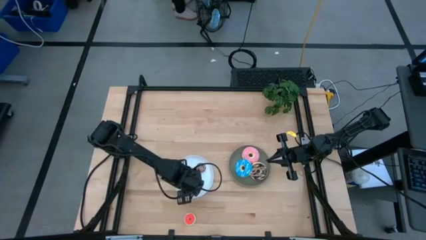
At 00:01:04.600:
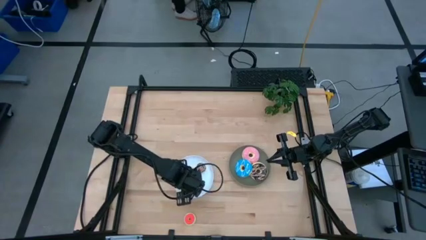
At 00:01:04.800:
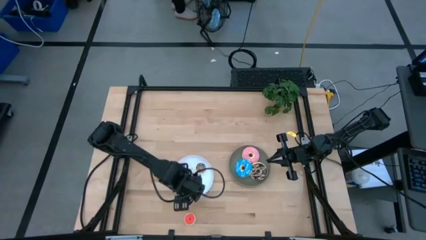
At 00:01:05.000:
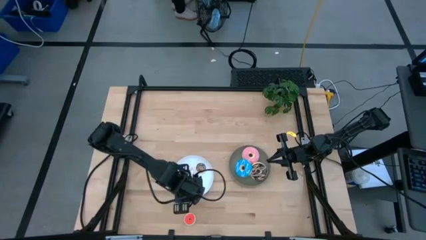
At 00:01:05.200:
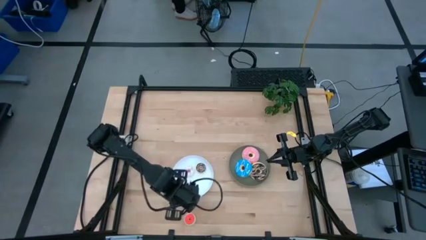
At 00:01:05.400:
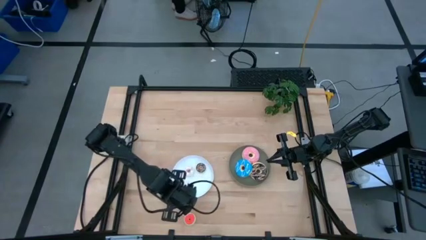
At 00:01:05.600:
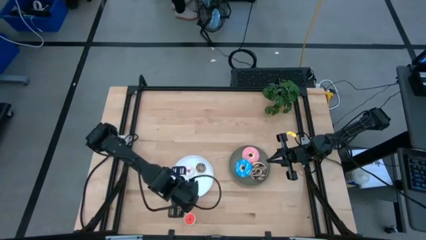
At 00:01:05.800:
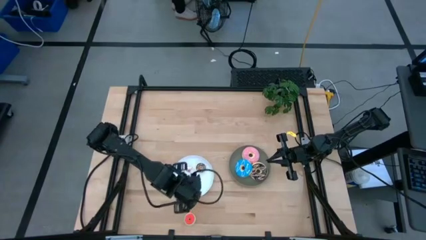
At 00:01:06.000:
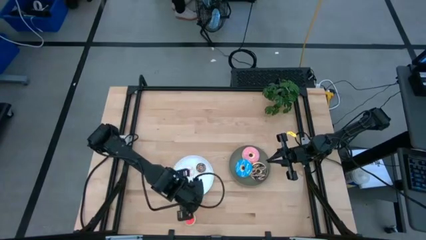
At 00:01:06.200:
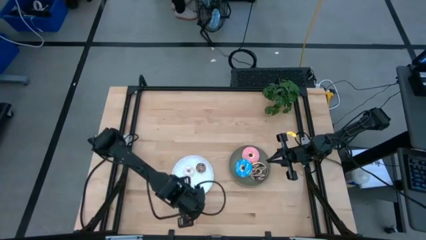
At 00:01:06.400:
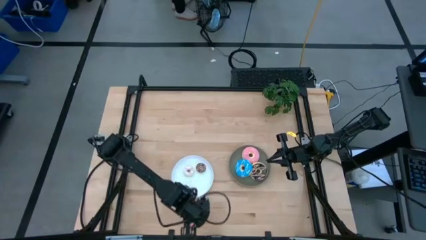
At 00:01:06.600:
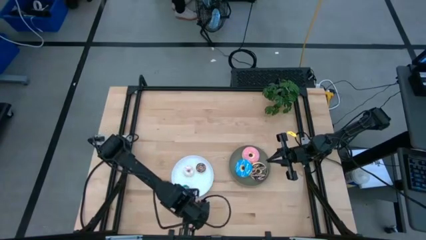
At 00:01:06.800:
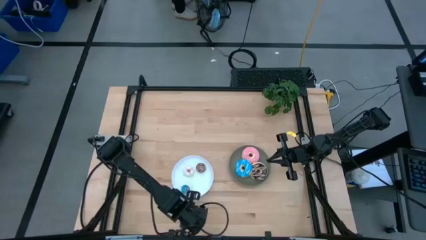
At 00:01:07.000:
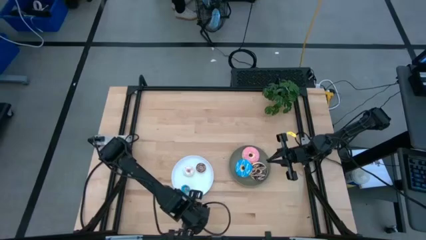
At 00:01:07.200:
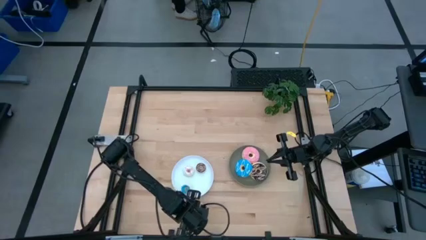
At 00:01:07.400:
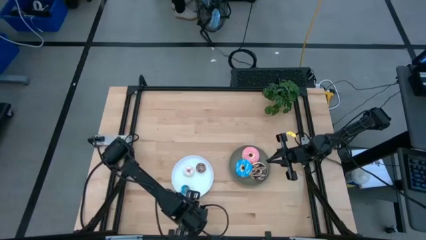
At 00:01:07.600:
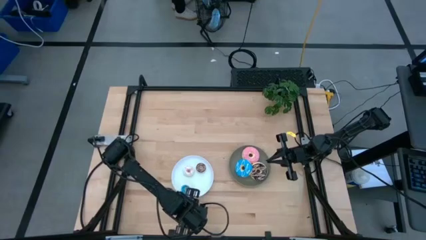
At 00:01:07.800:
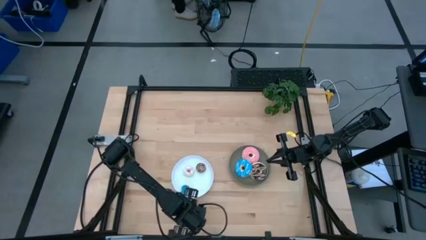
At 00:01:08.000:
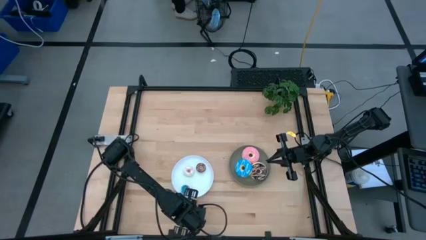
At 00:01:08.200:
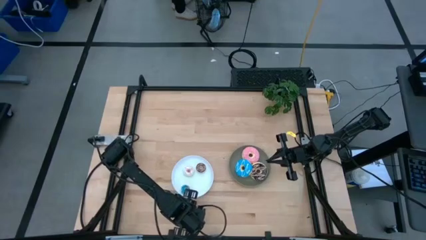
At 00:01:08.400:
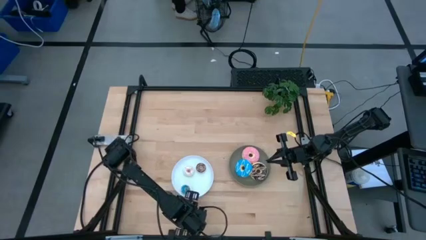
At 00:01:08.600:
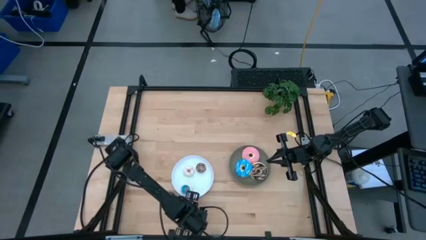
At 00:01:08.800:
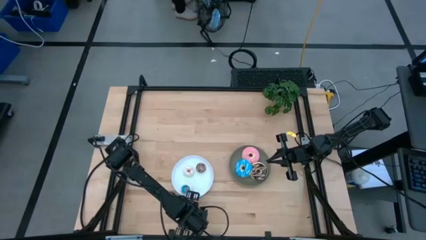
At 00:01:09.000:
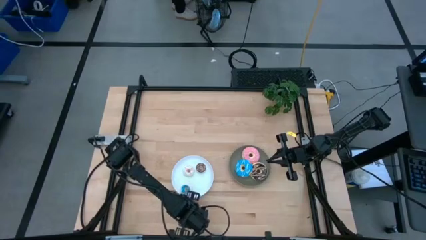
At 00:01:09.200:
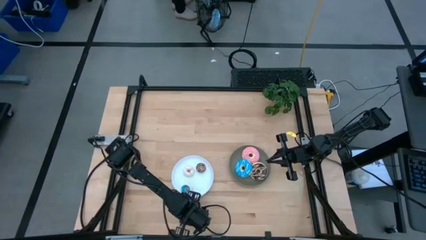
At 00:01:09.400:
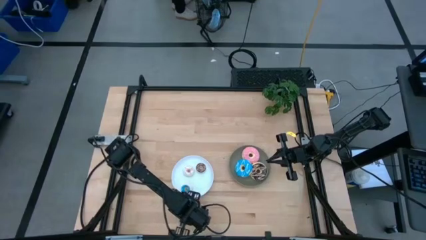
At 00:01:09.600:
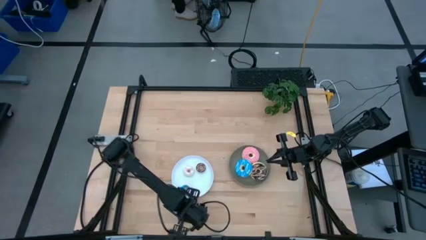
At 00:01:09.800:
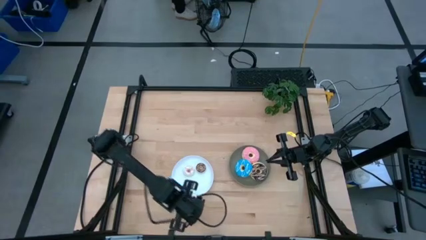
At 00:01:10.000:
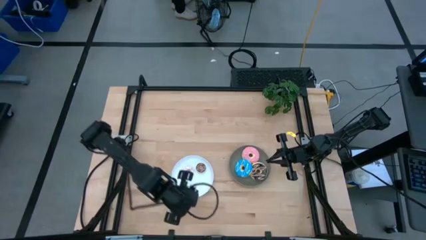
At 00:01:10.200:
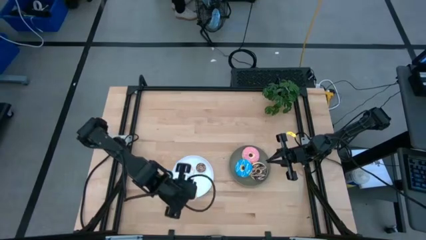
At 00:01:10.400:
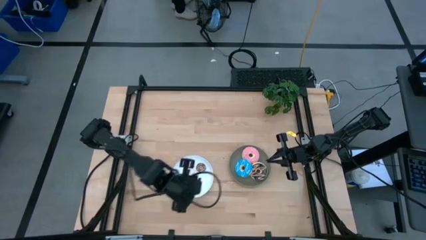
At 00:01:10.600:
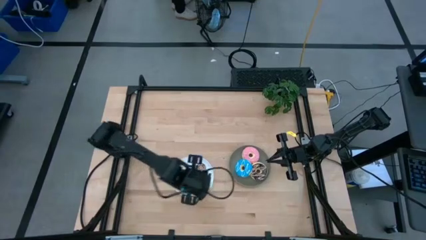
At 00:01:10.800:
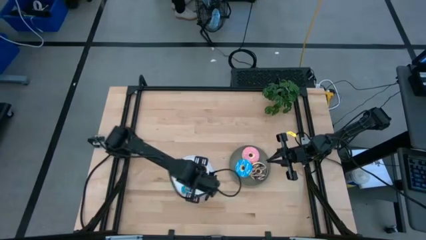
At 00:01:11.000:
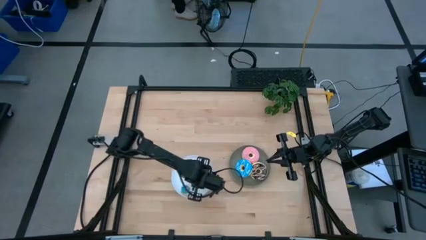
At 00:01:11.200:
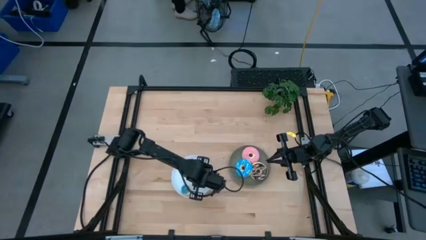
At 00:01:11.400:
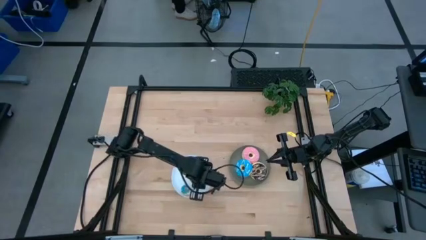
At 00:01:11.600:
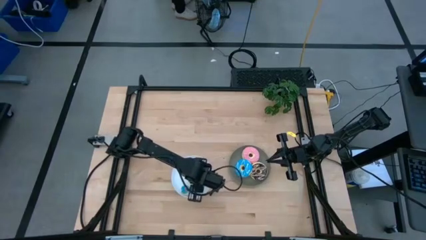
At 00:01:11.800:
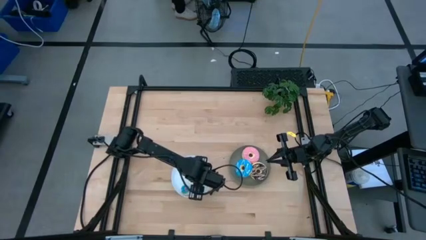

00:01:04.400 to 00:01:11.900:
Task: Pick & Place donuts
Put the small red donut on the white plate

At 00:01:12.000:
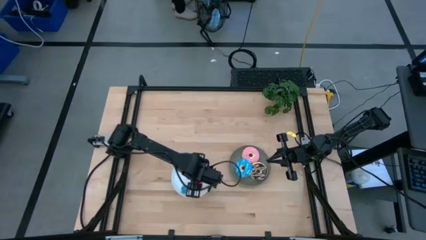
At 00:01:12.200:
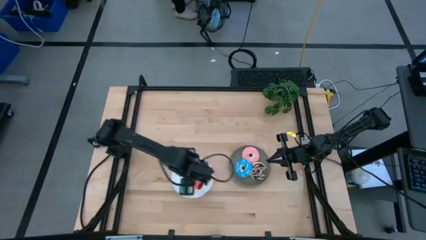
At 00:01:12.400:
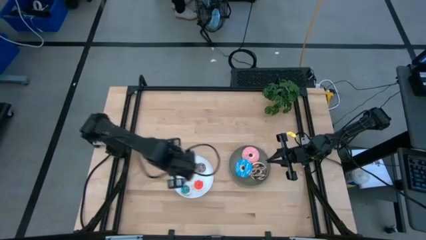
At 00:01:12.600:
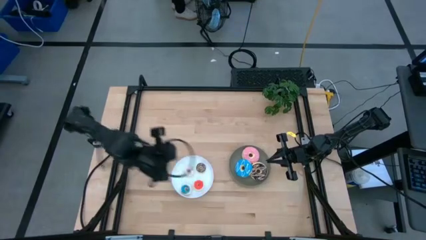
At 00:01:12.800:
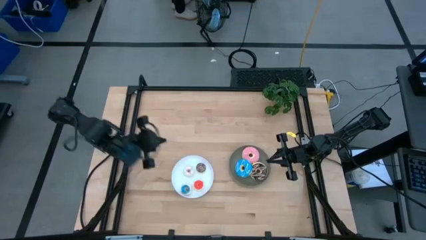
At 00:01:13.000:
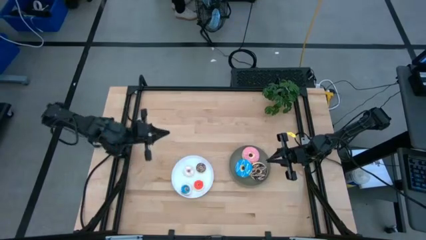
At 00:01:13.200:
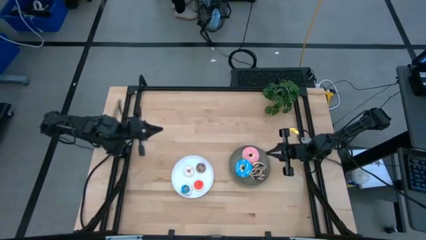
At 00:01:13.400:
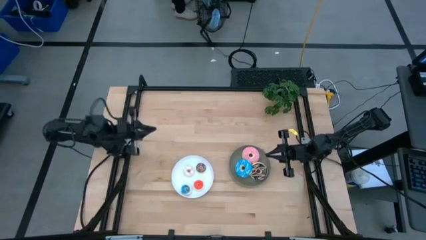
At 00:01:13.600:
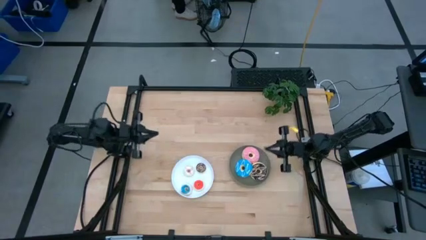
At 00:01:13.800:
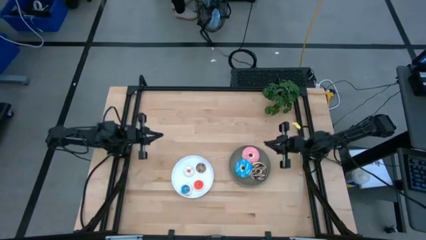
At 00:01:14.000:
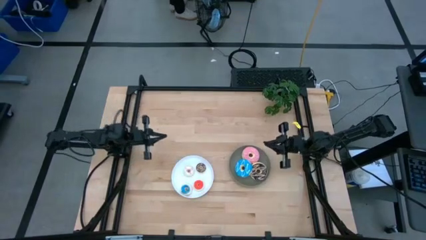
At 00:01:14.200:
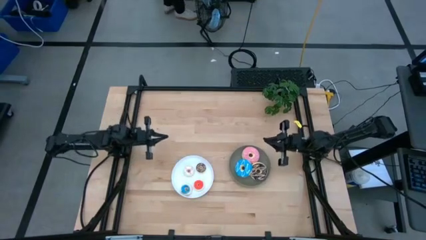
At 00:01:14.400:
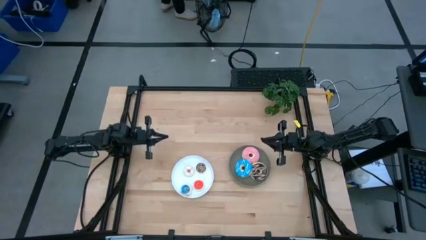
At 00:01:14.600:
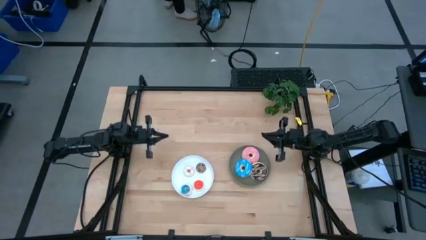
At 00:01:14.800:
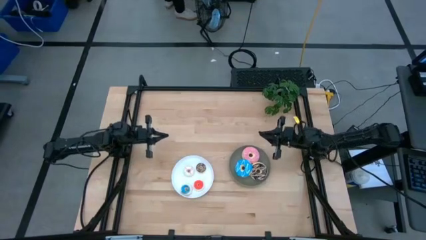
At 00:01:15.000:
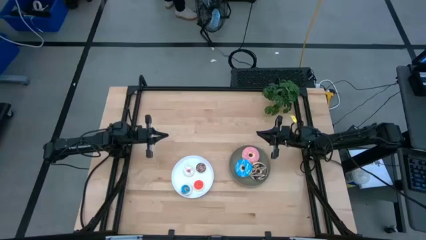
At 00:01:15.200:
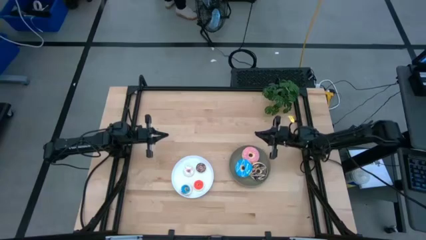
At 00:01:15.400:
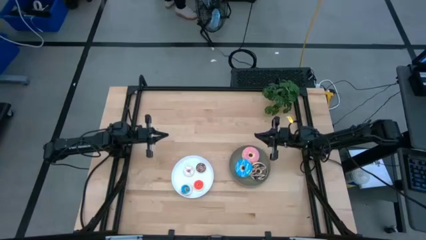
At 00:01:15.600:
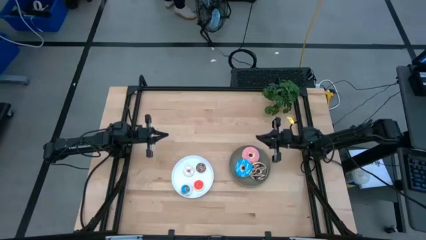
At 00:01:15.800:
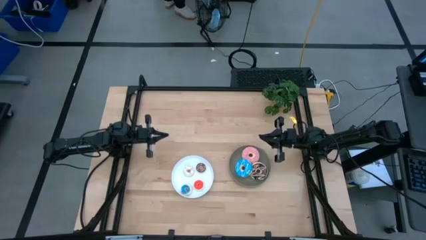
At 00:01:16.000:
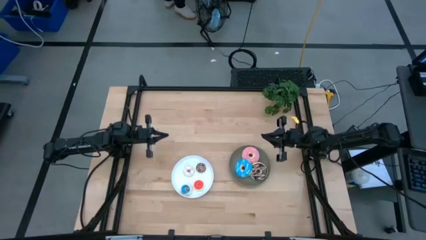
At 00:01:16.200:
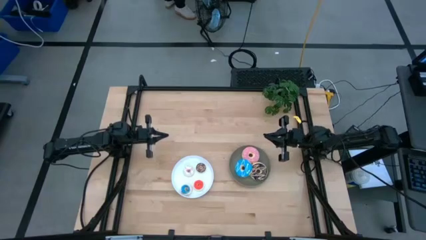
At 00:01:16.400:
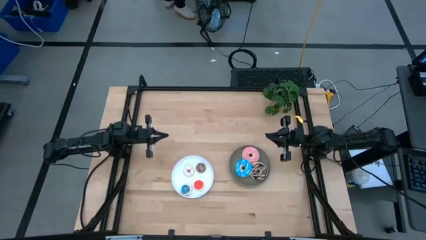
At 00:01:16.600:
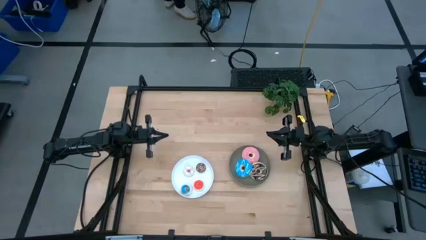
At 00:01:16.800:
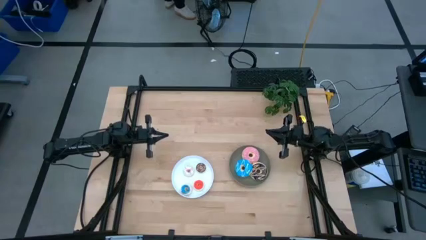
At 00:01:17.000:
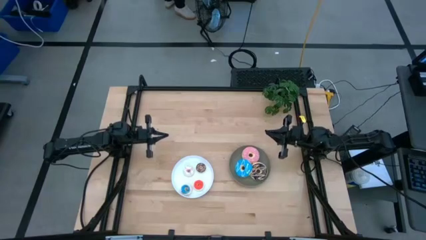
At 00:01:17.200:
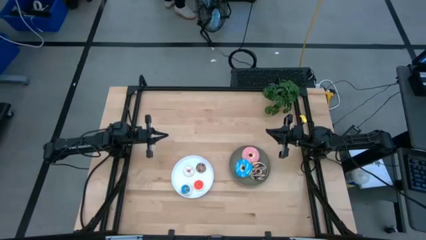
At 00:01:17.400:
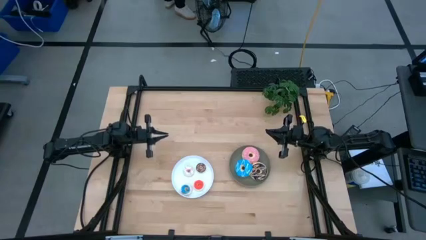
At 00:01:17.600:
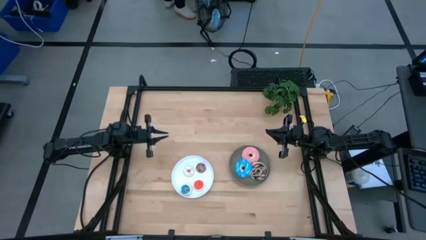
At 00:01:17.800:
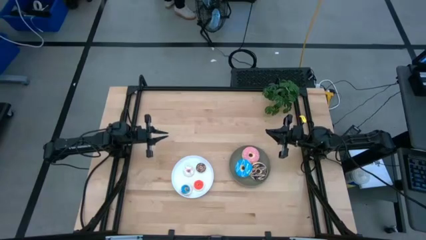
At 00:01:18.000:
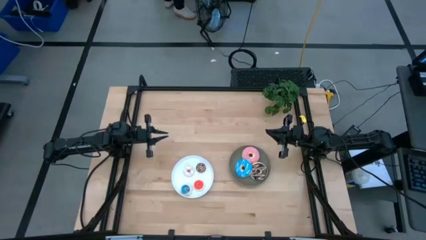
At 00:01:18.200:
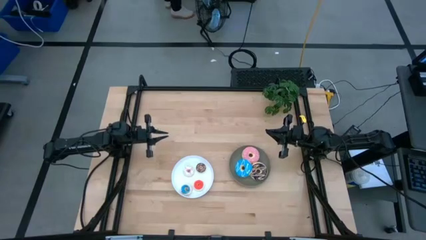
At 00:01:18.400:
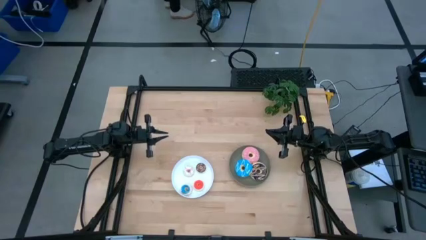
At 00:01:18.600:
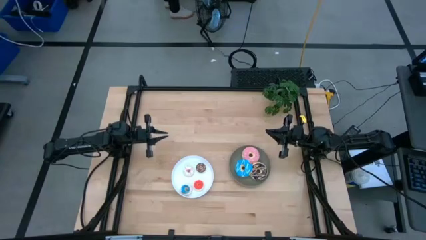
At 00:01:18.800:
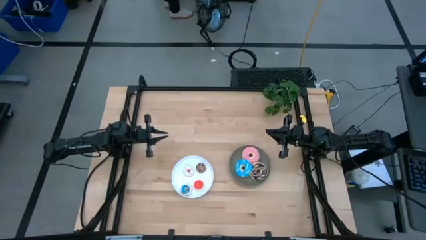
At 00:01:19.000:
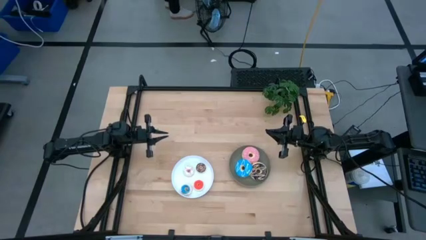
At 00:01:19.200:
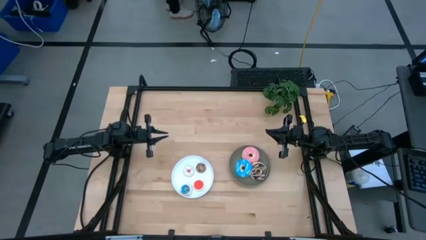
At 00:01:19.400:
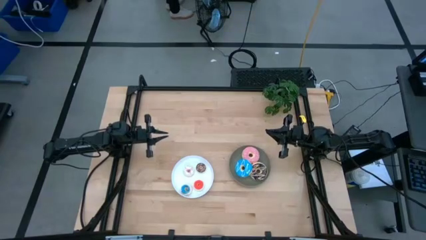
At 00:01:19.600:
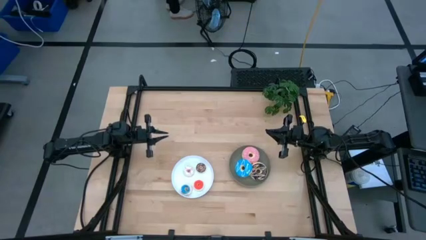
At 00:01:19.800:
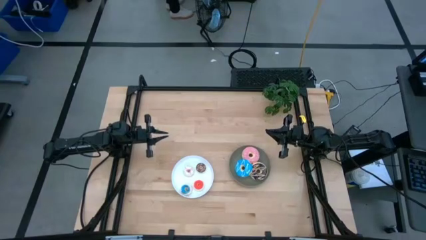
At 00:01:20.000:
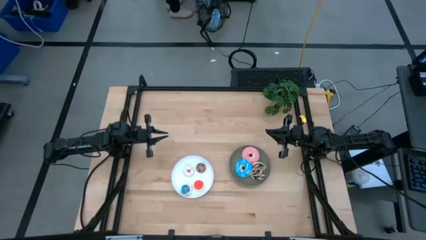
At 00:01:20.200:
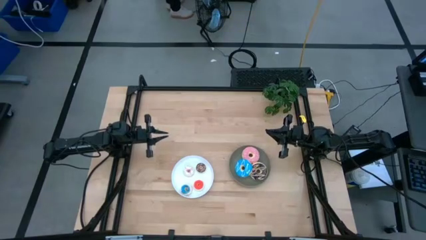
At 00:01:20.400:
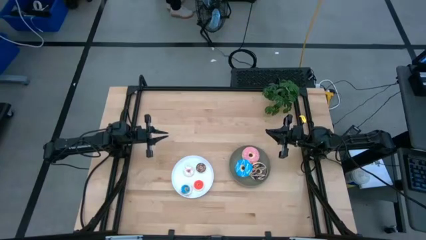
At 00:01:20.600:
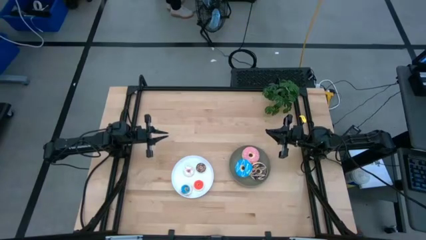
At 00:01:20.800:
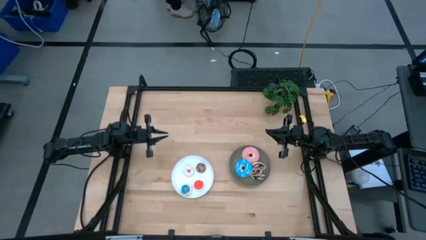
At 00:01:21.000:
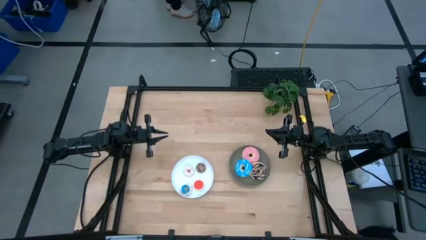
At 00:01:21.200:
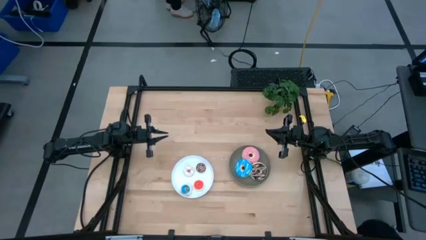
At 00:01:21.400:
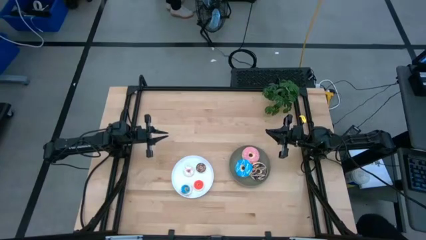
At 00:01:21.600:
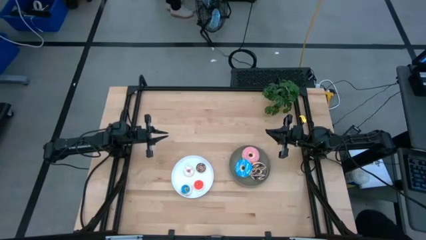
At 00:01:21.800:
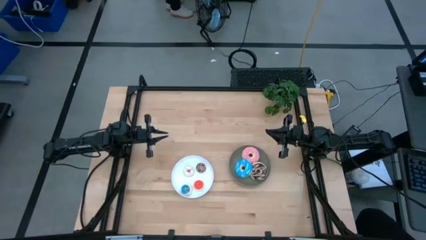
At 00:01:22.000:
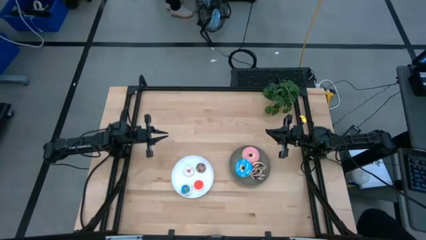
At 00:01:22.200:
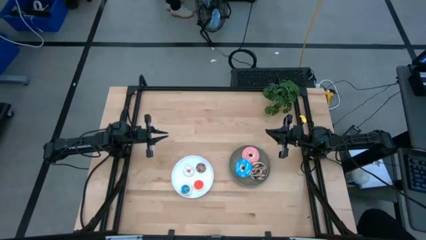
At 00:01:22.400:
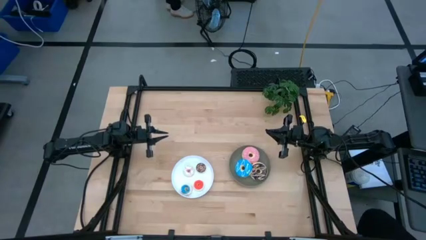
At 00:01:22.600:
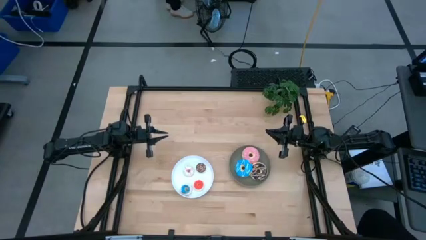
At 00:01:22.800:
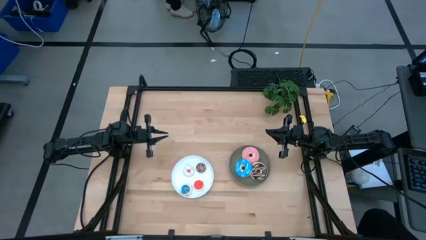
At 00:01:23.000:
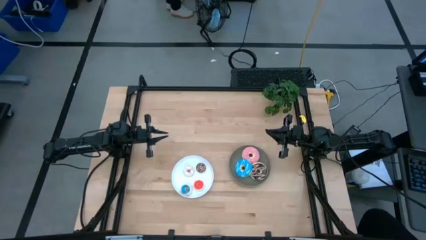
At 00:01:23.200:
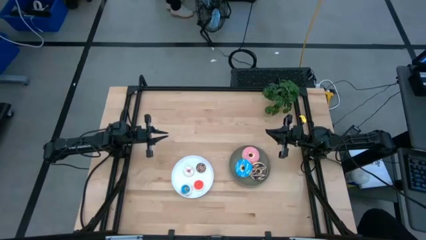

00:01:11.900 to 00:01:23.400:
Return to Home Position
